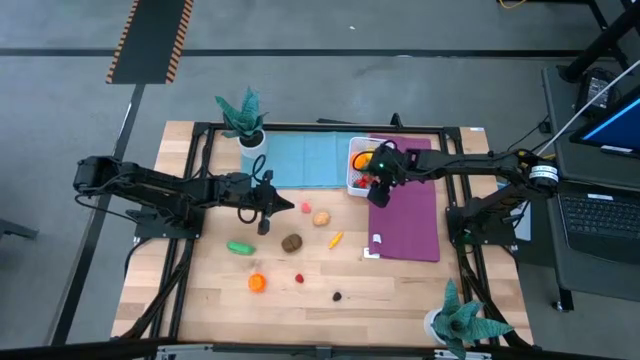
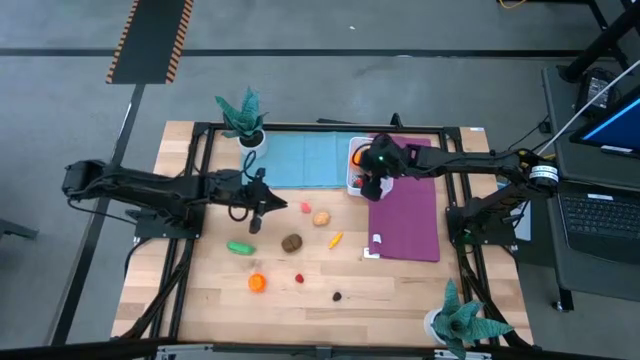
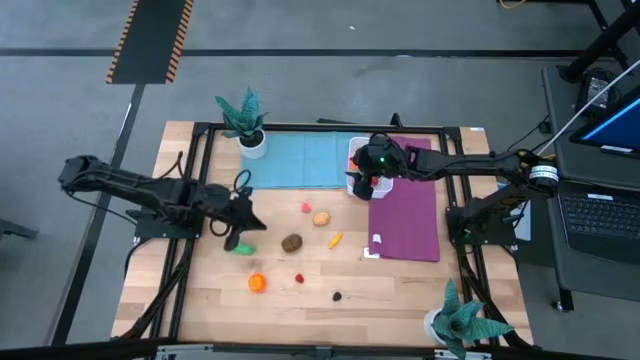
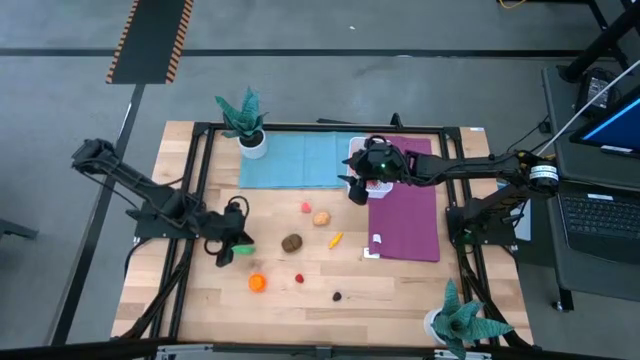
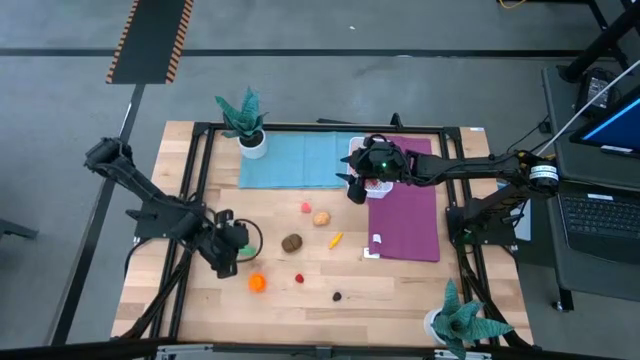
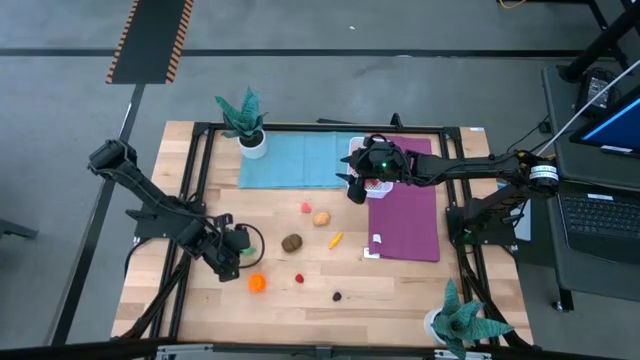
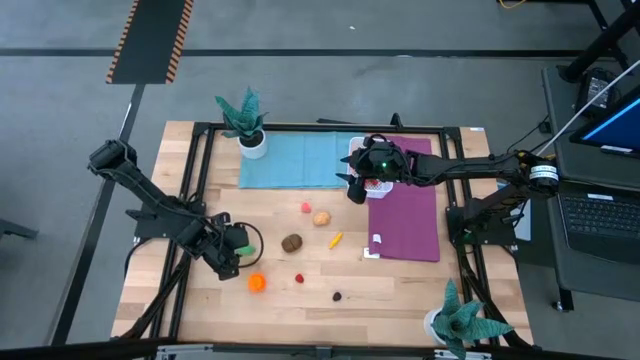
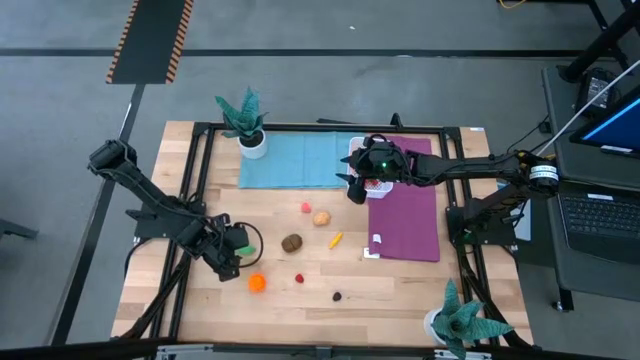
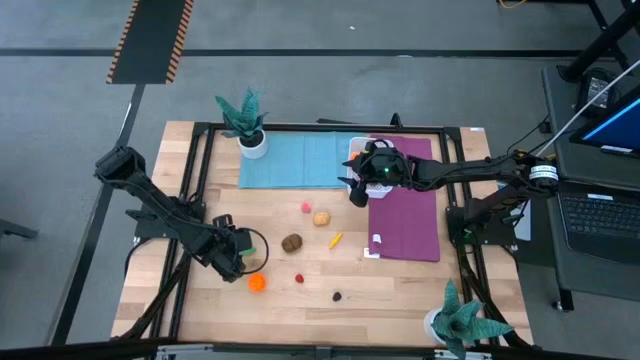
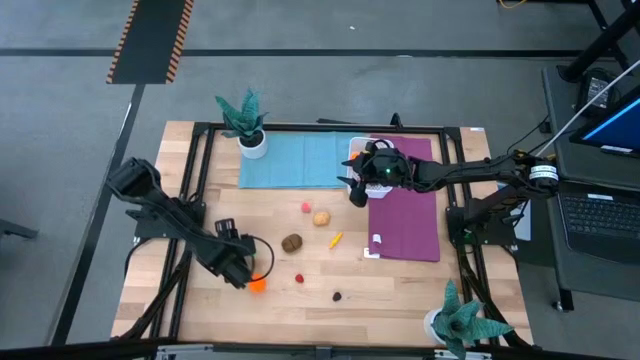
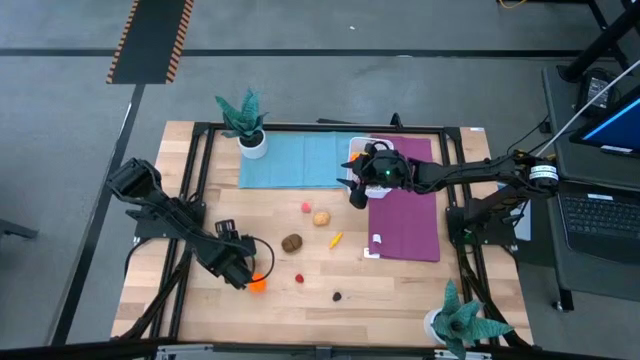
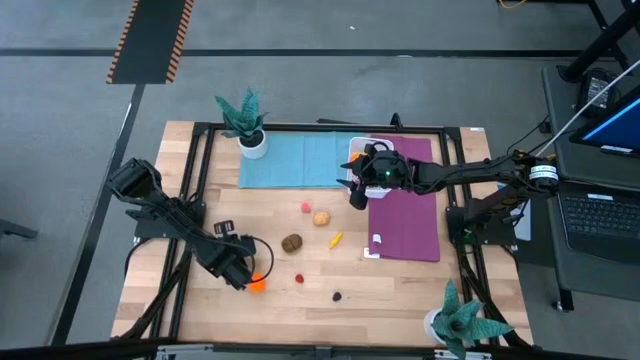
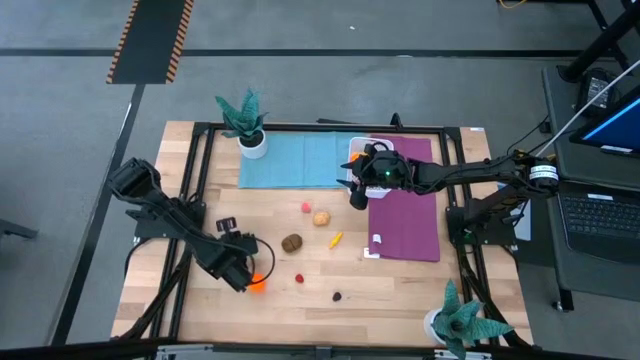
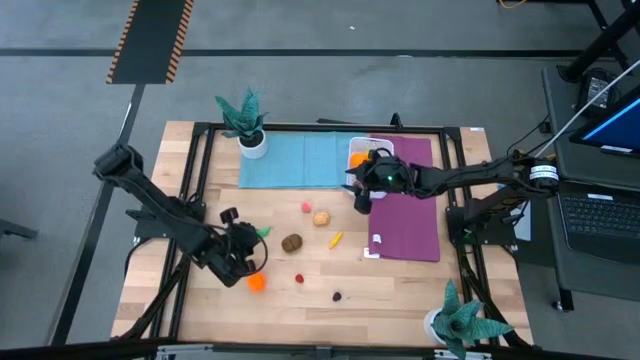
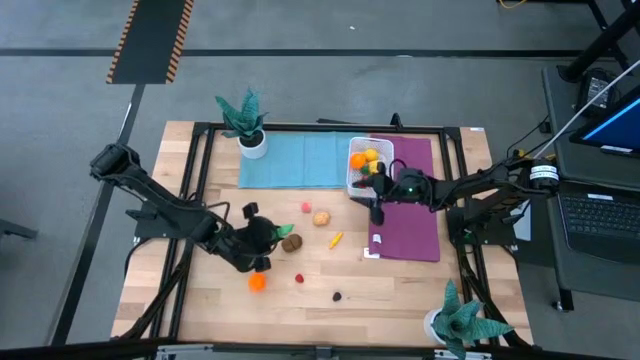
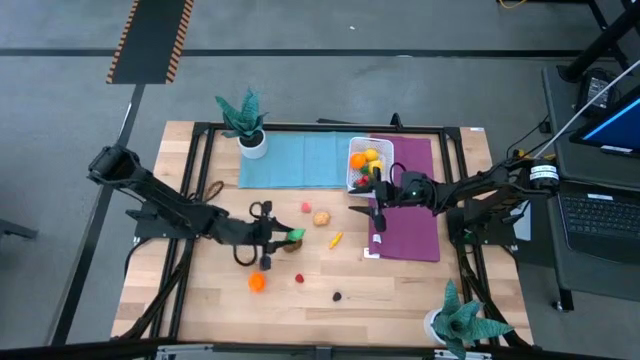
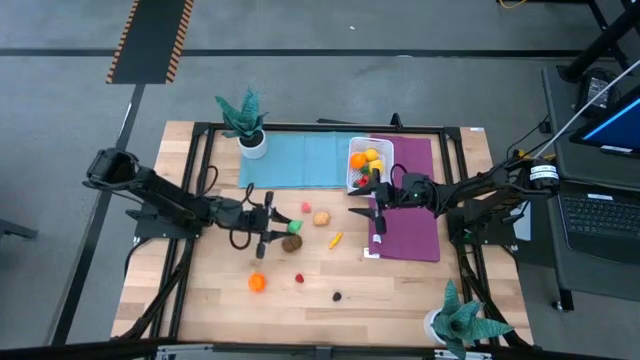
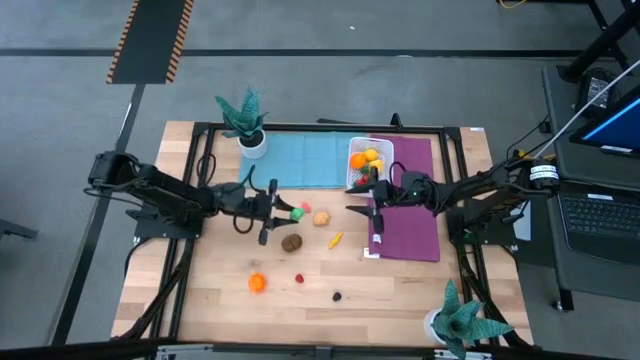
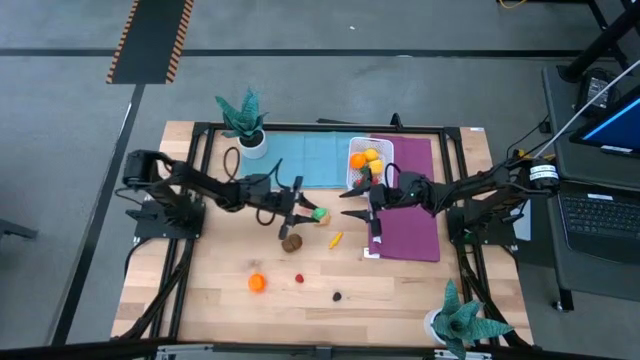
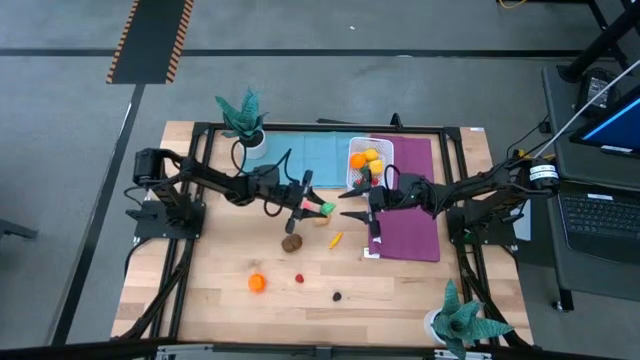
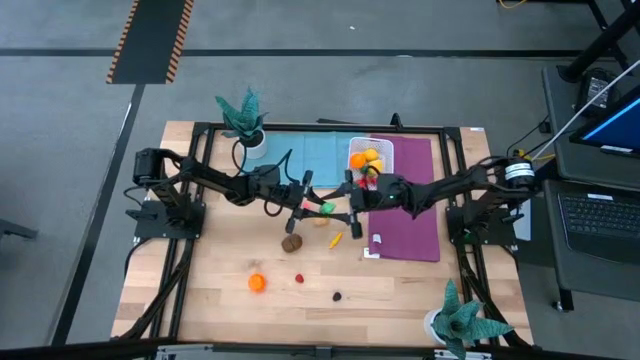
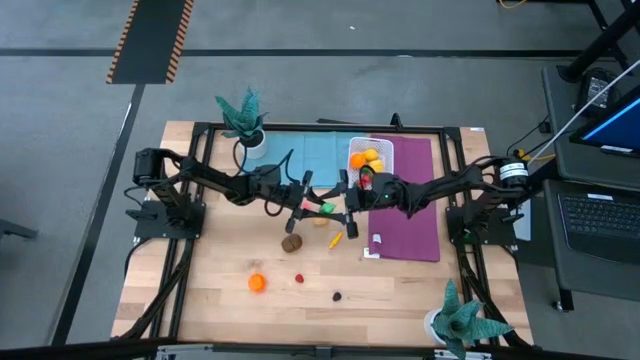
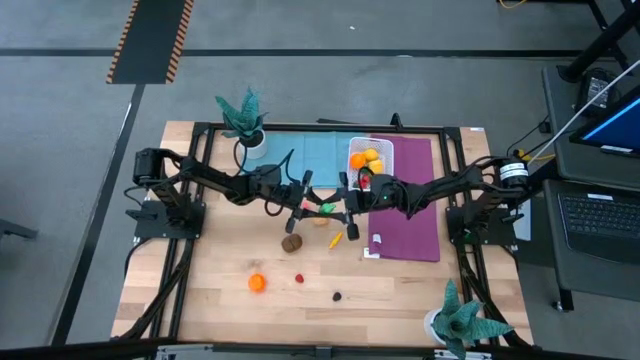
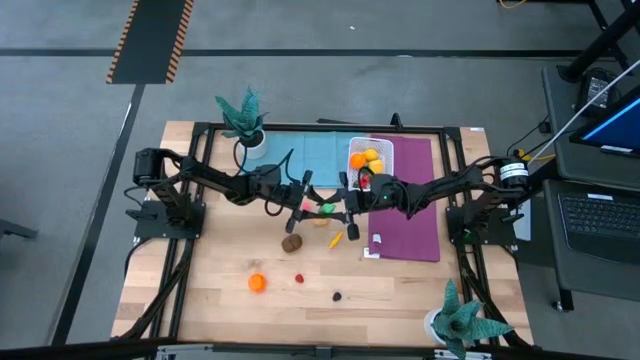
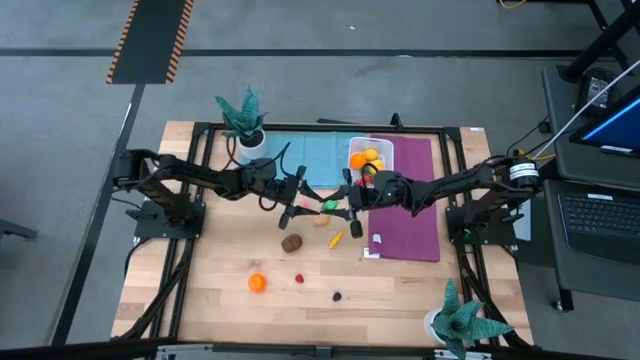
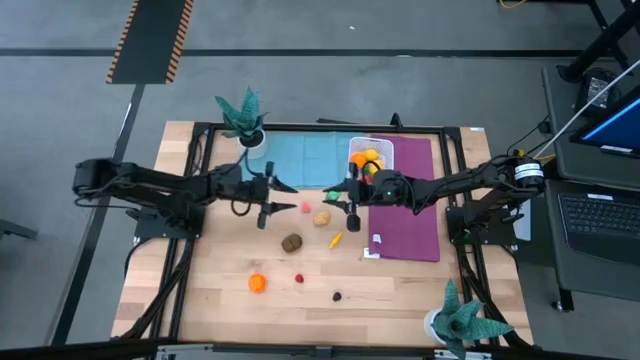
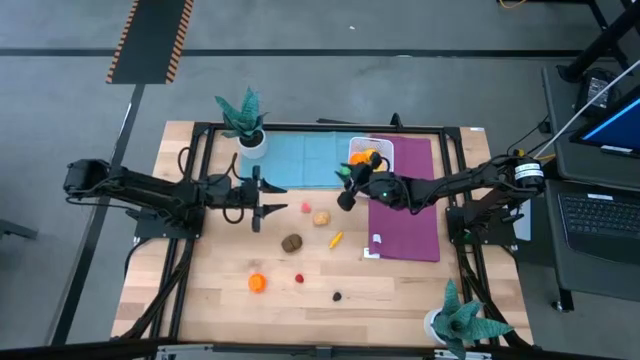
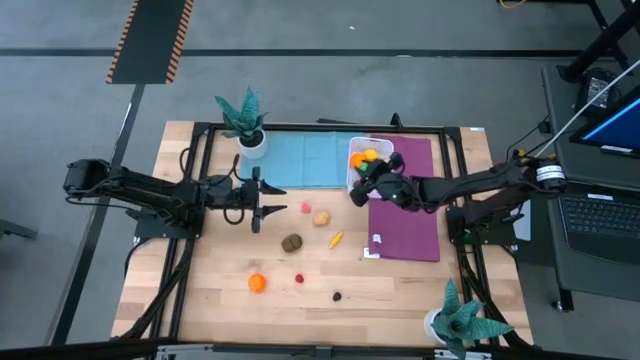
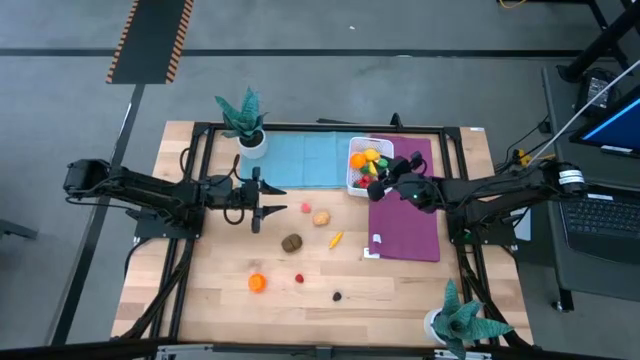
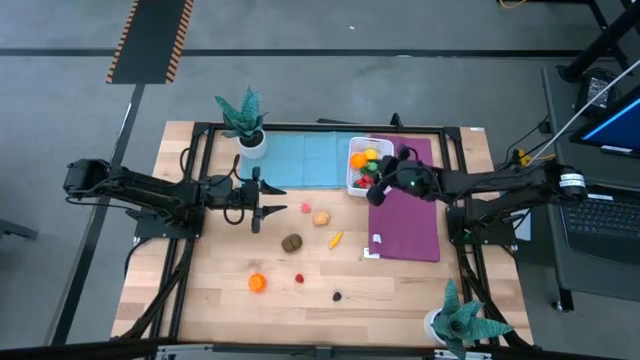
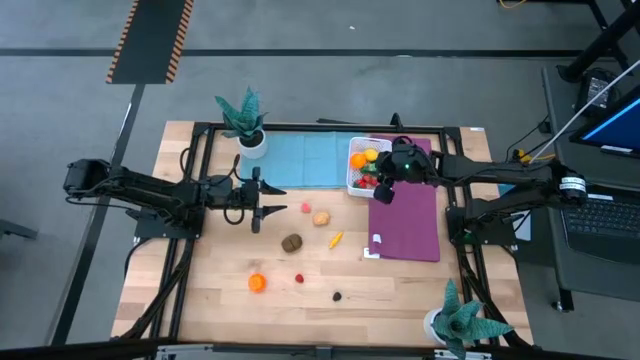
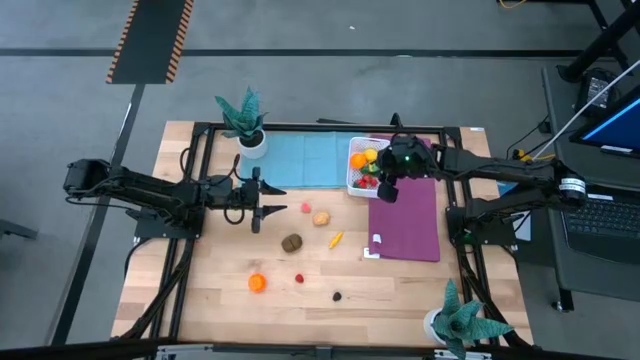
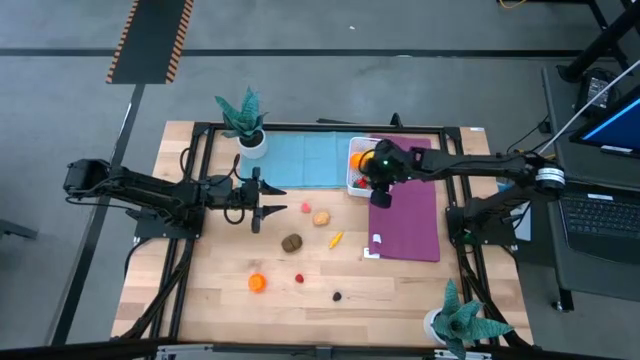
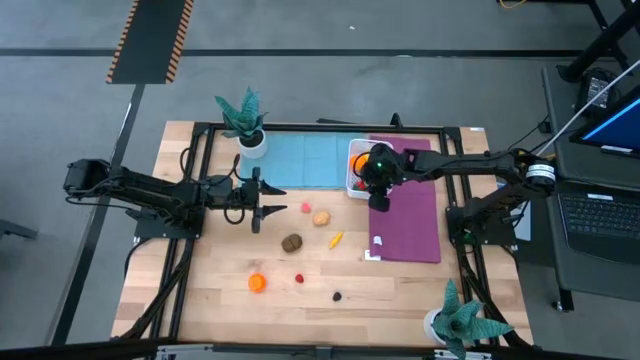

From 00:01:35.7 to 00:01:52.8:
Task: Pick and placing Produce into tupperware
Put the green pea into the white container

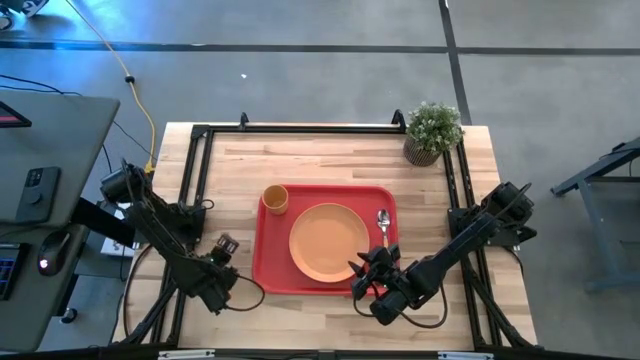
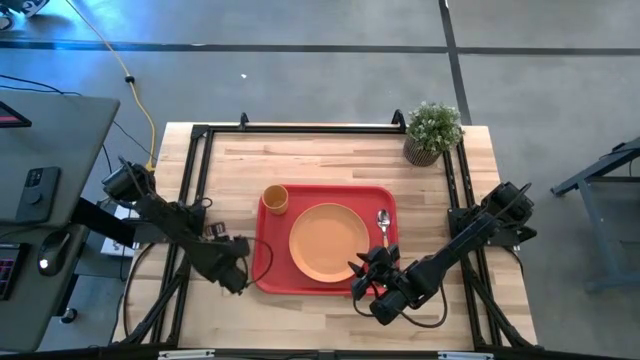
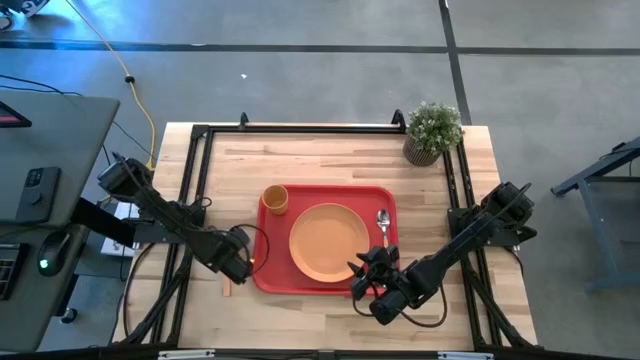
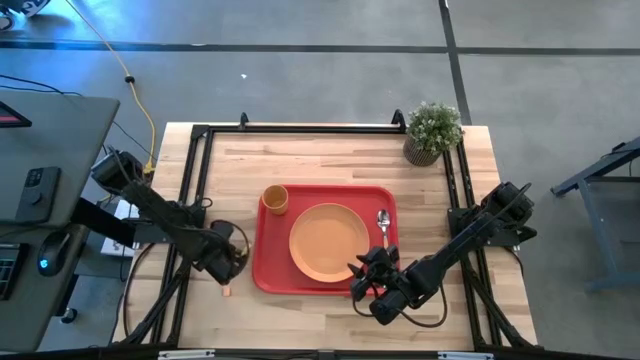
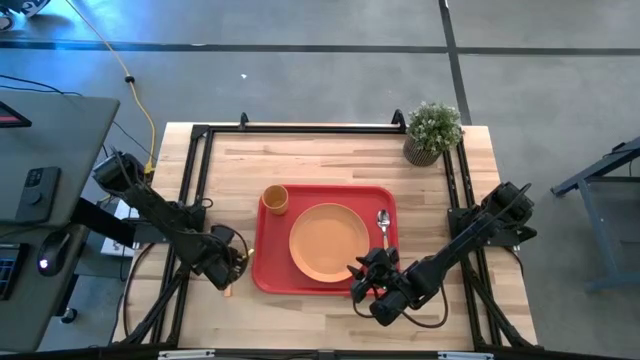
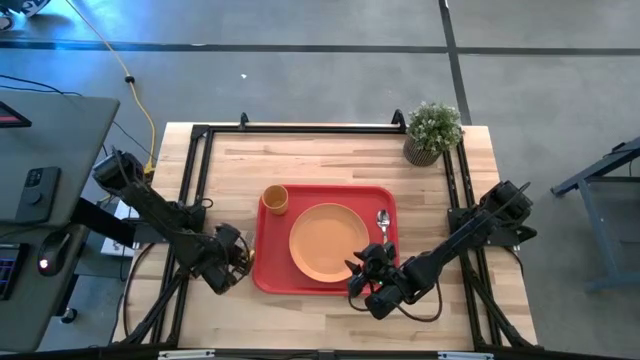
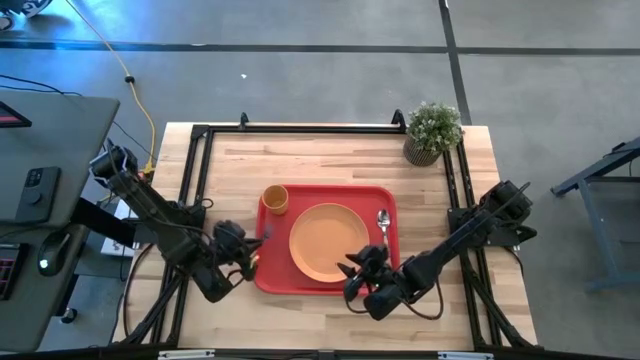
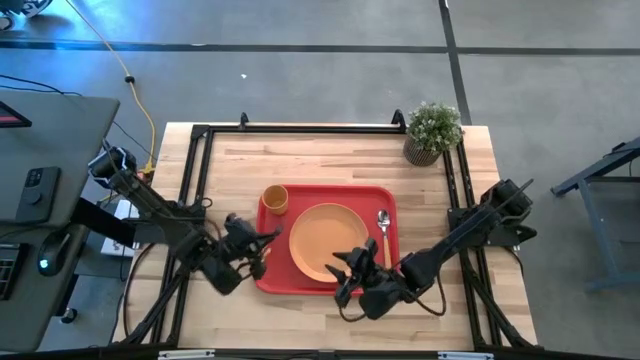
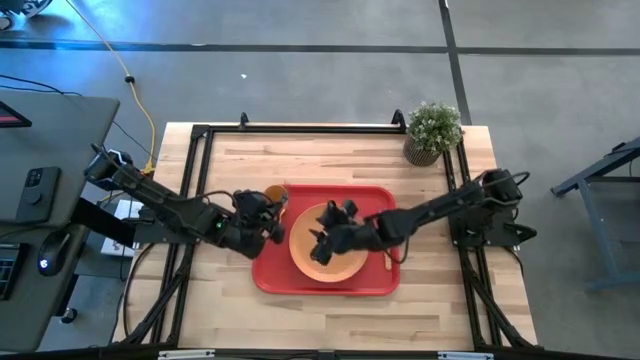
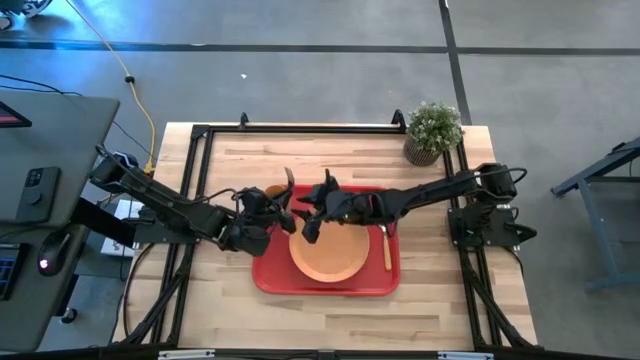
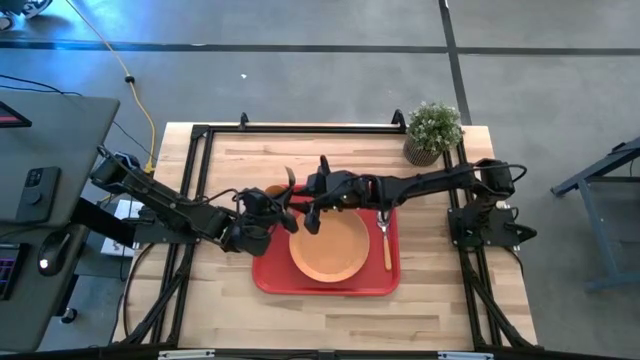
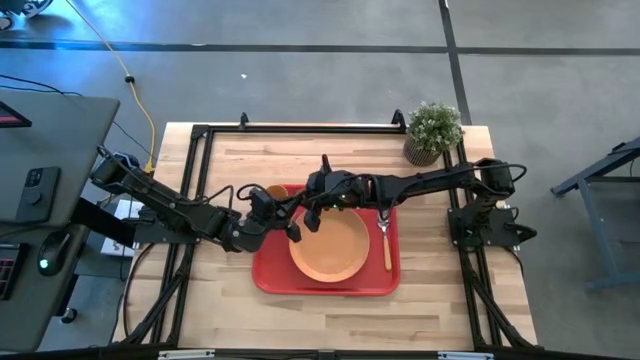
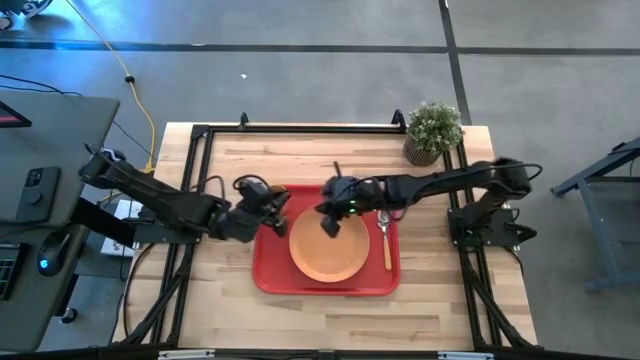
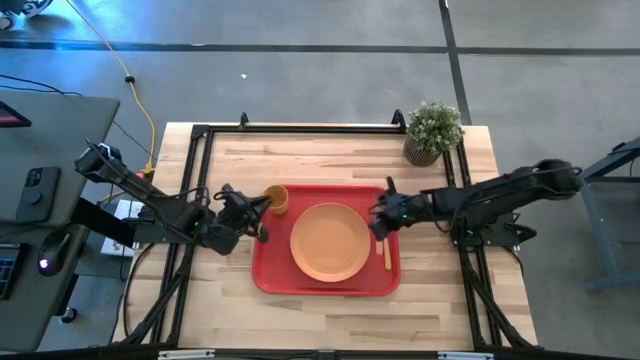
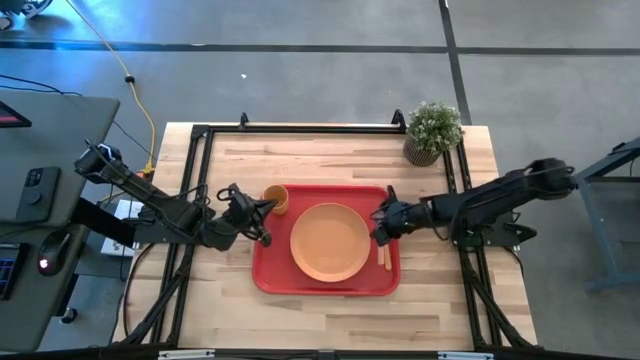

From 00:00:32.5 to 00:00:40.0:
Task: Pick and place plate/cup/fork/spoon on tray
Put the orange fork on the red tray to the left of the orange spoon
